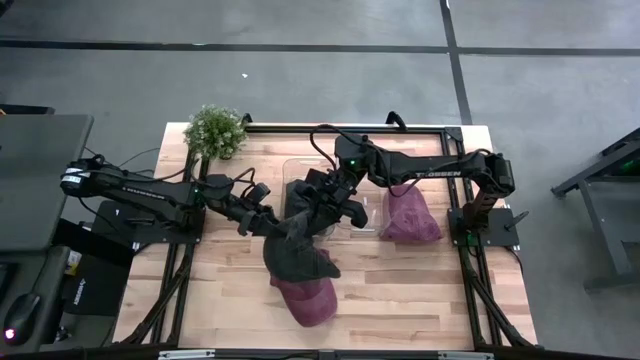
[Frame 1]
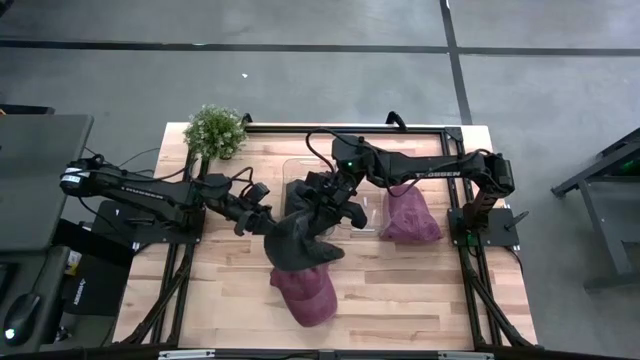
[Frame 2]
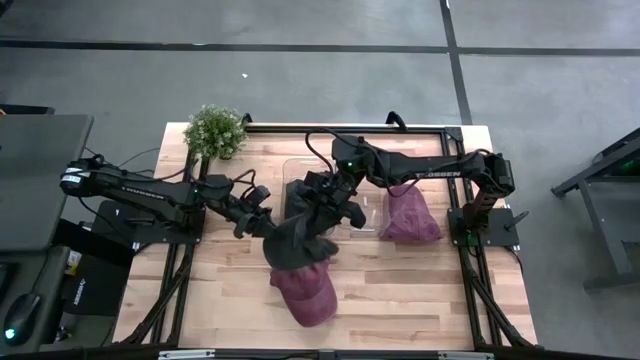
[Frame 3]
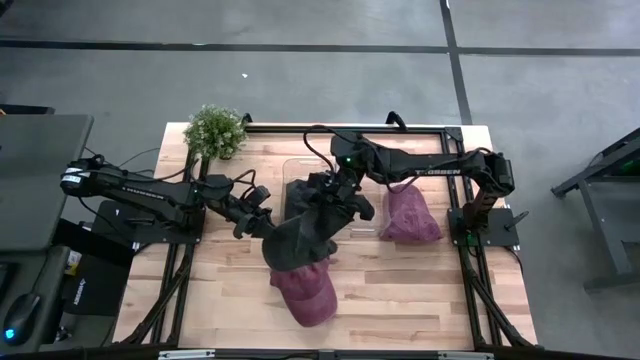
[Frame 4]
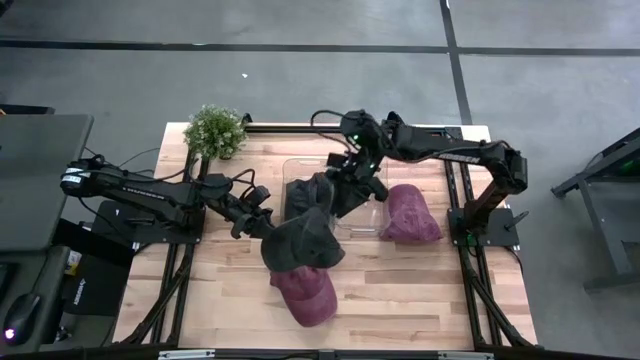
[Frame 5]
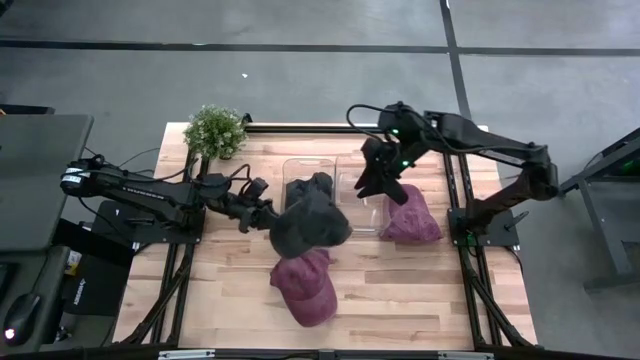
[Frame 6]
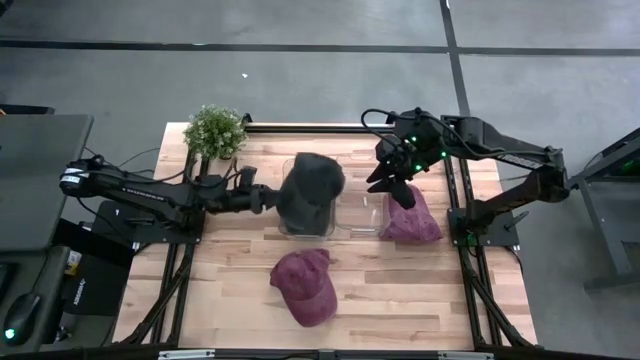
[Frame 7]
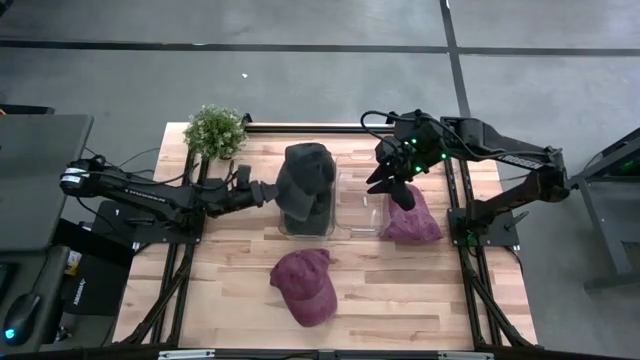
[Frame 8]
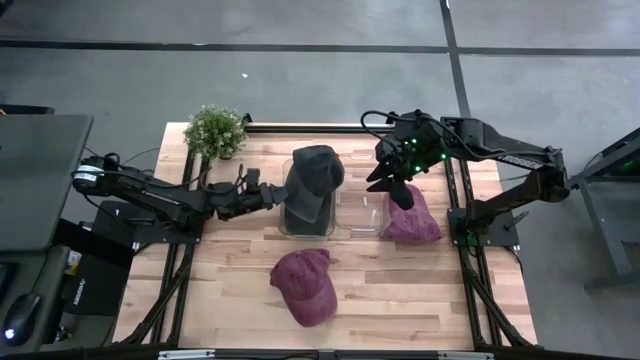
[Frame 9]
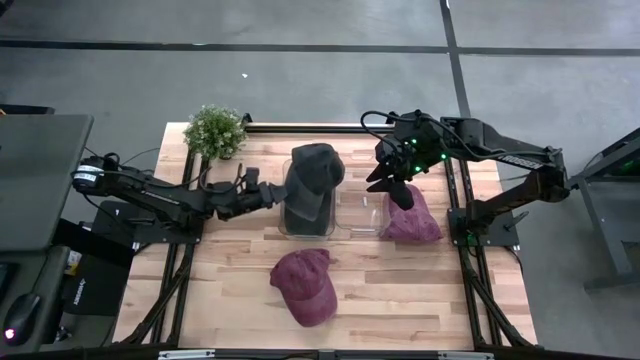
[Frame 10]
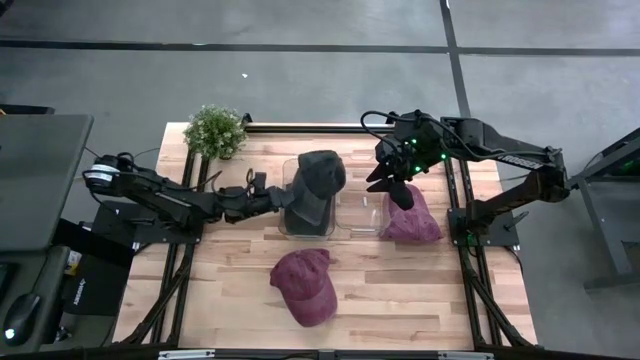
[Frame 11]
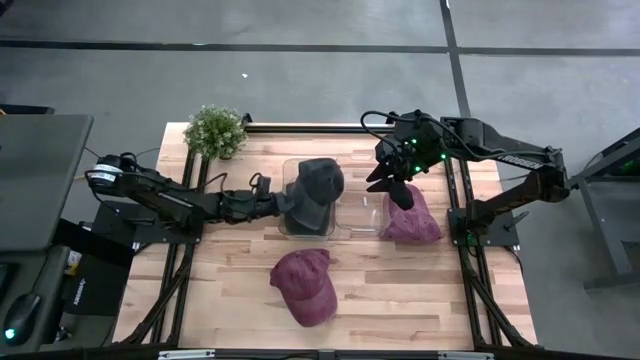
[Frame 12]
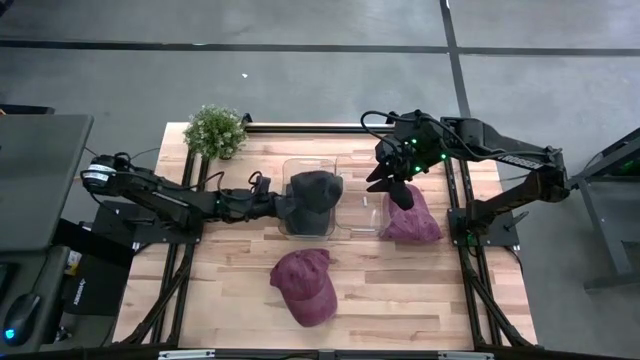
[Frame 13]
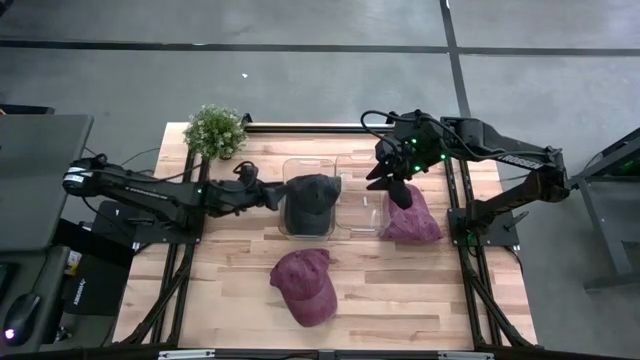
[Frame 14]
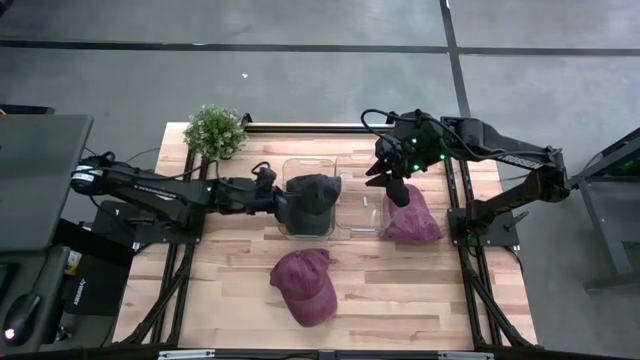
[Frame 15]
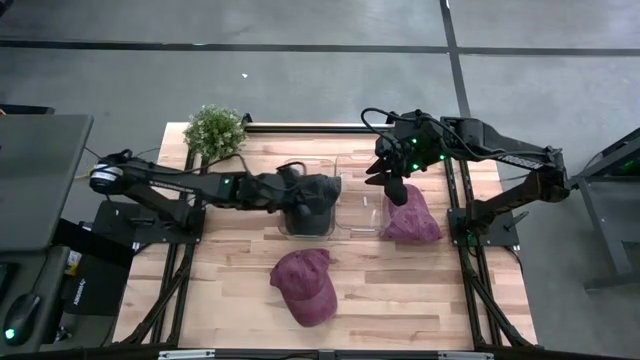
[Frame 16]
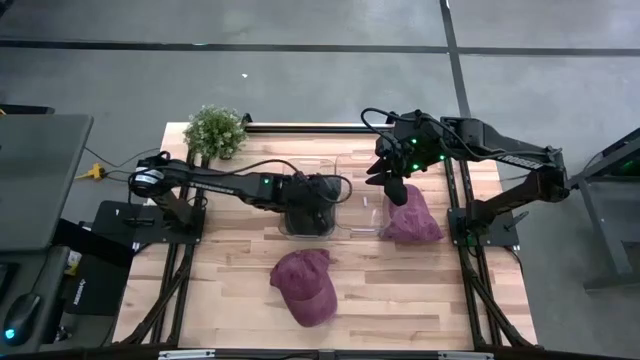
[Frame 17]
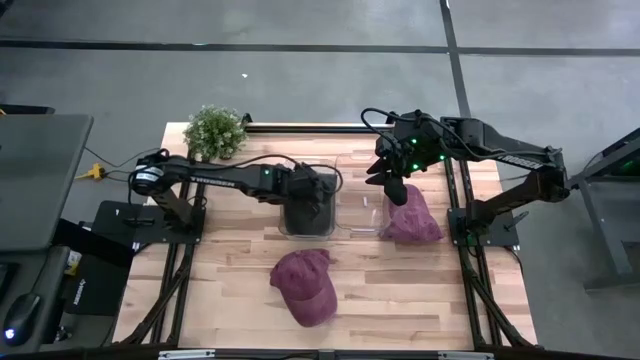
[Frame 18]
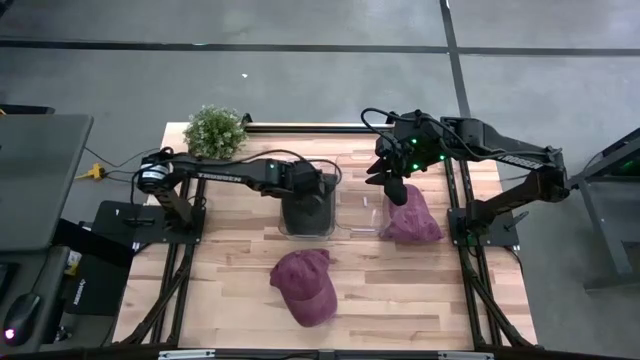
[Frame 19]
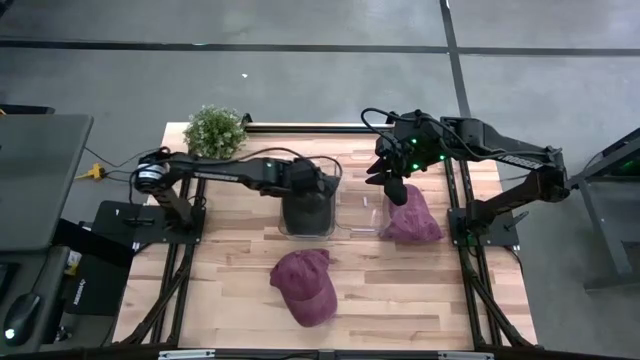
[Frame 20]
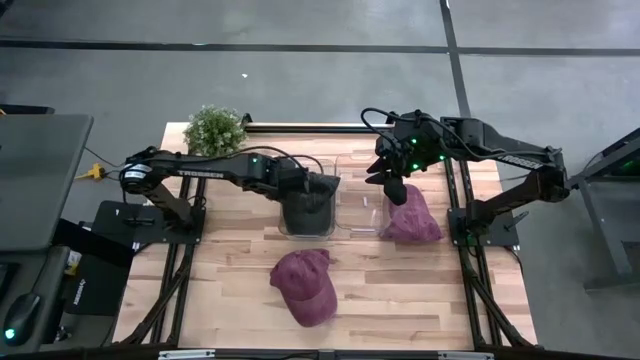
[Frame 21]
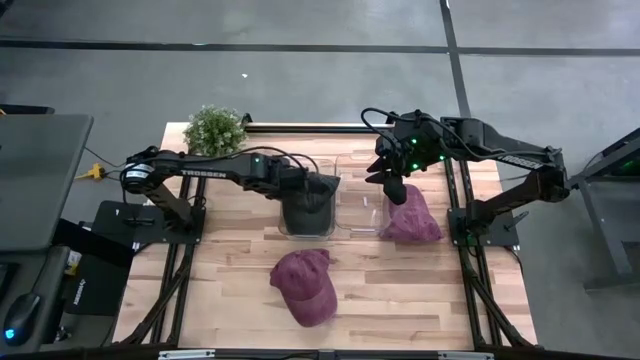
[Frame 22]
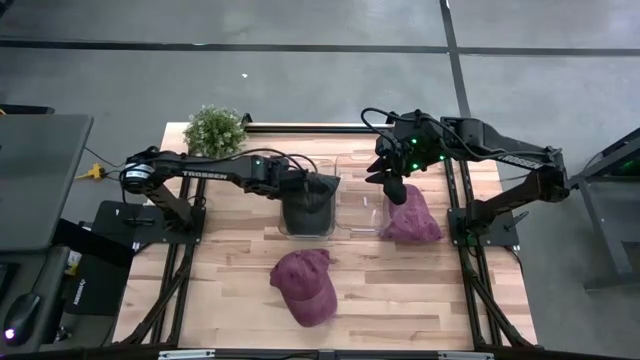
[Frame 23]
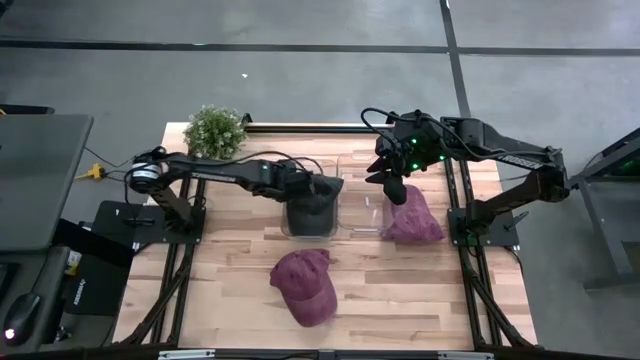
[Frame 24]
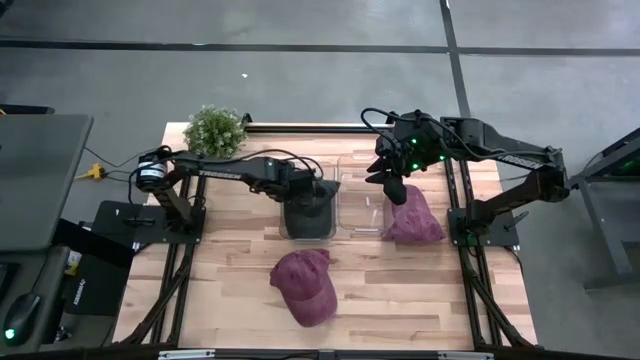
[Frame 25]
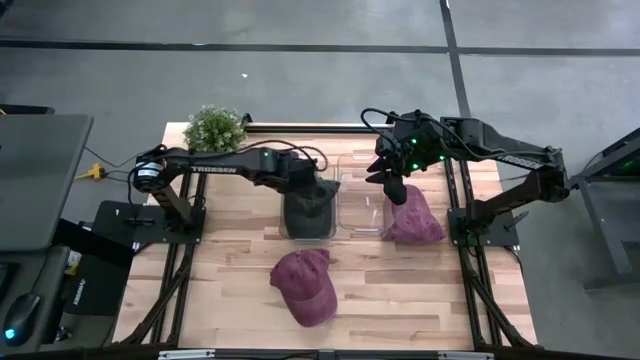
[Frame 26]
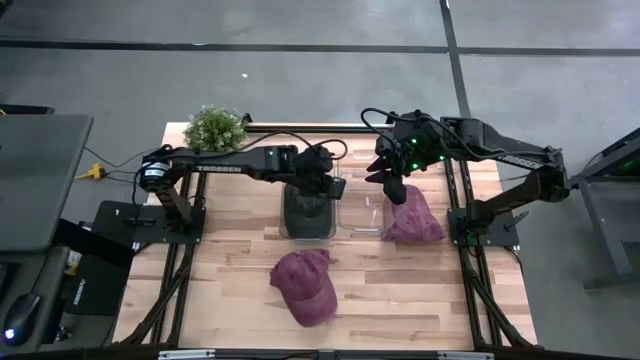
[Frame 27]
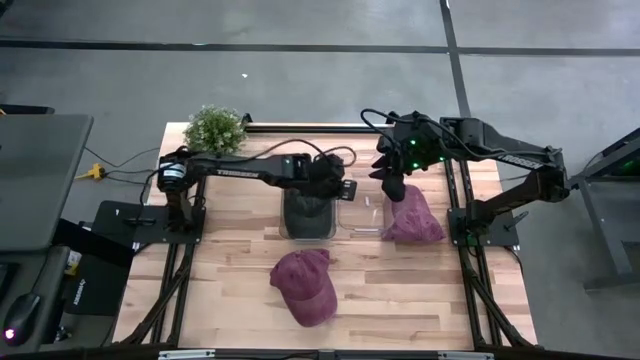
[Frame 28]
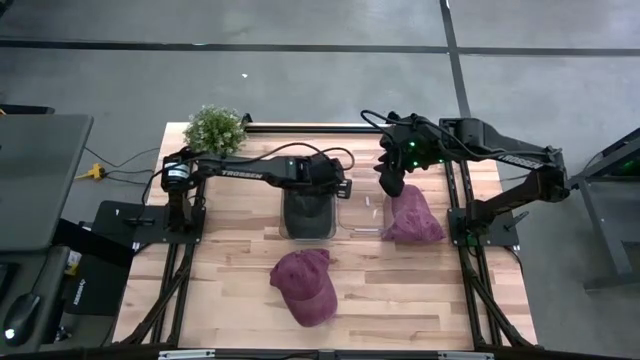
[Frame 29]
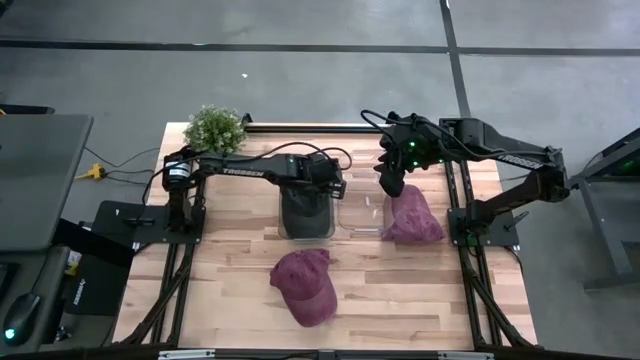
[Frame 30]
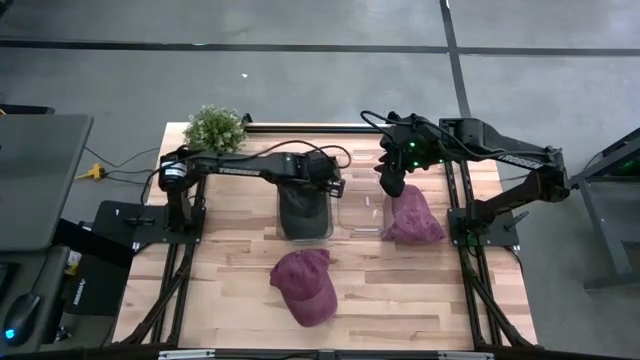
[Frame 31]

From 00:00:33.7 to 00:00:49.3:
Task: Pick & Place hat
Put the black cap into the left transparent bin

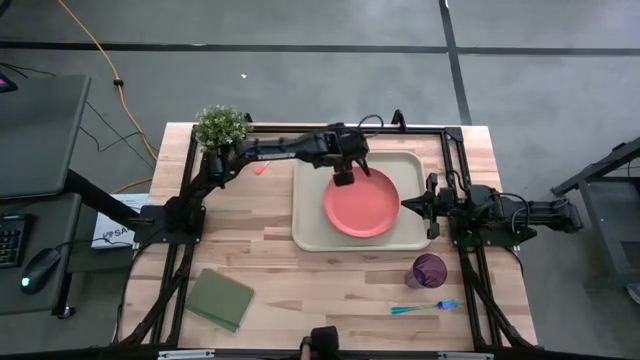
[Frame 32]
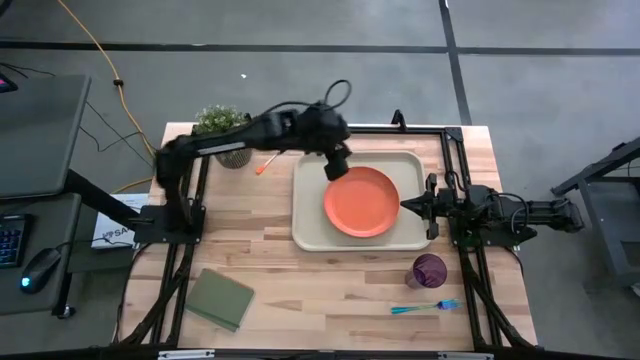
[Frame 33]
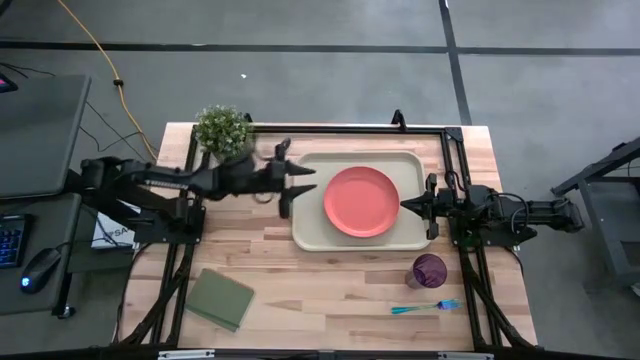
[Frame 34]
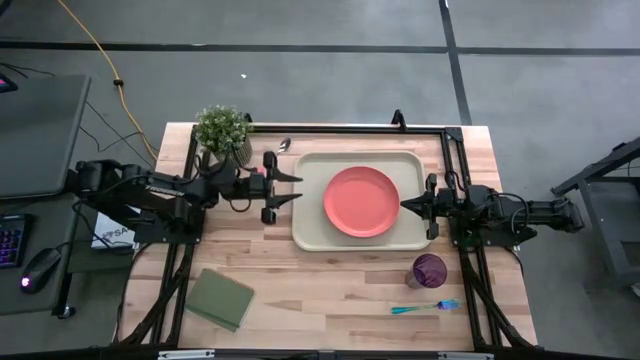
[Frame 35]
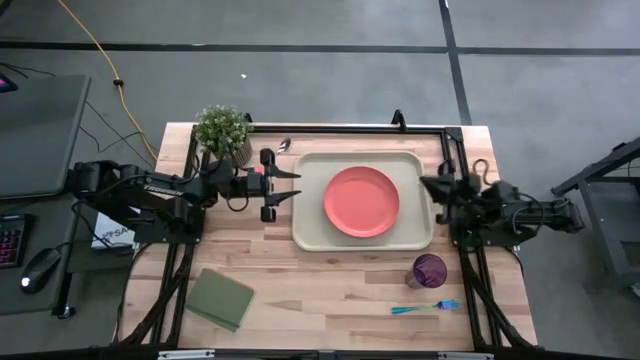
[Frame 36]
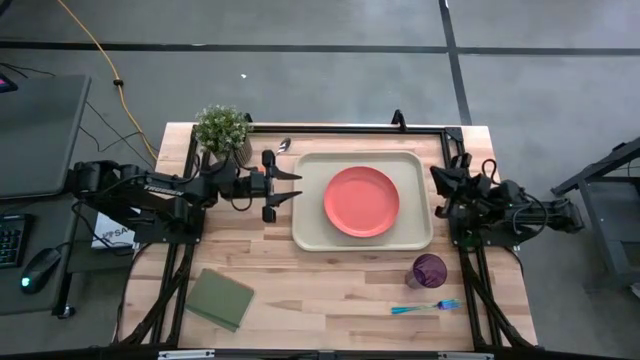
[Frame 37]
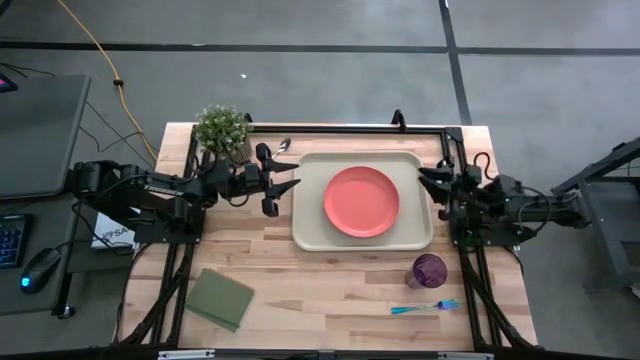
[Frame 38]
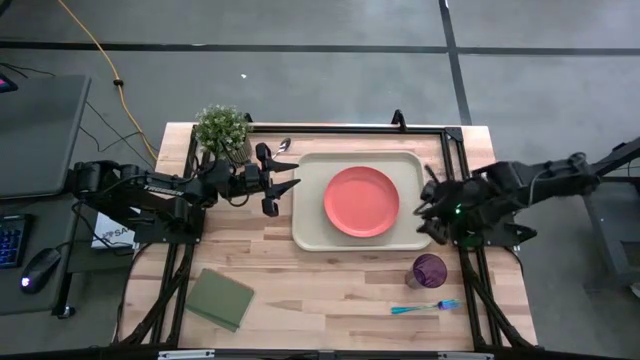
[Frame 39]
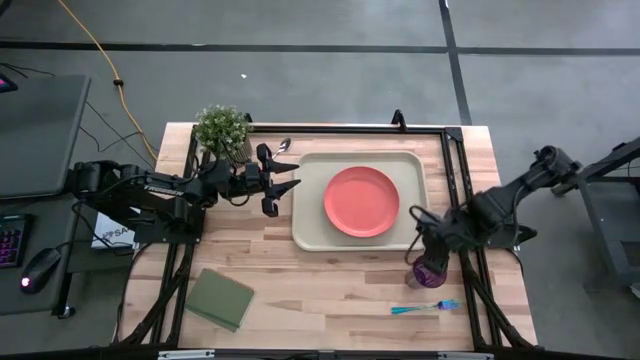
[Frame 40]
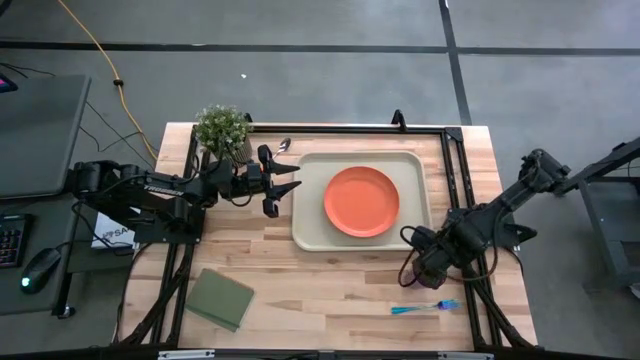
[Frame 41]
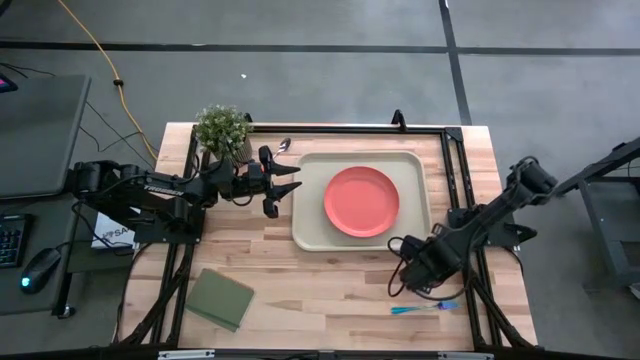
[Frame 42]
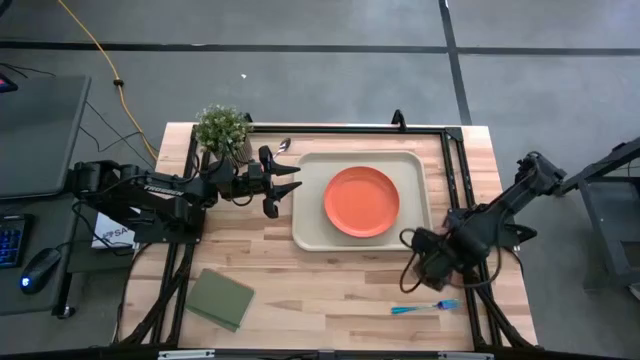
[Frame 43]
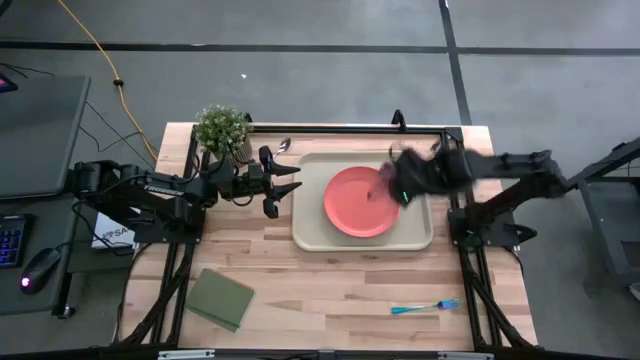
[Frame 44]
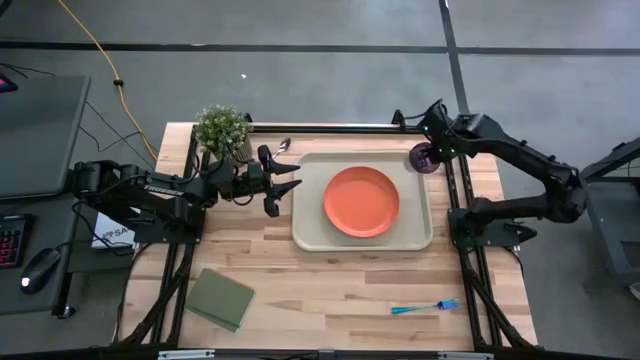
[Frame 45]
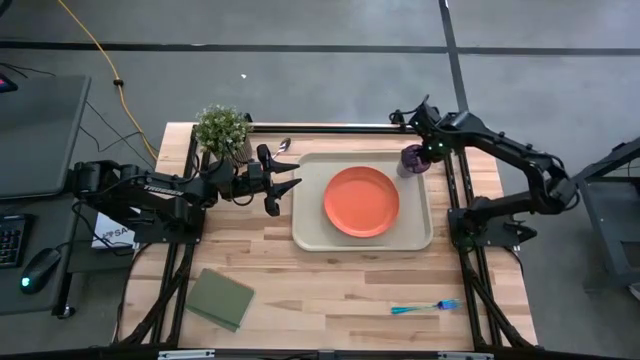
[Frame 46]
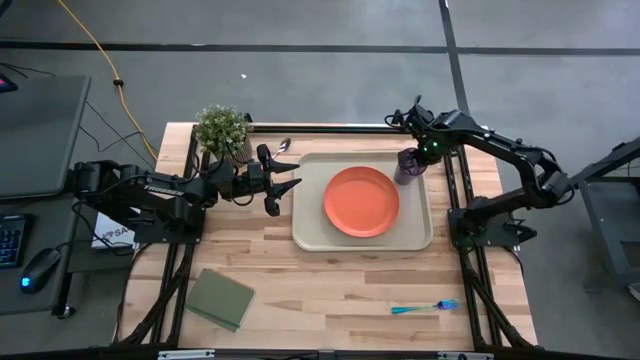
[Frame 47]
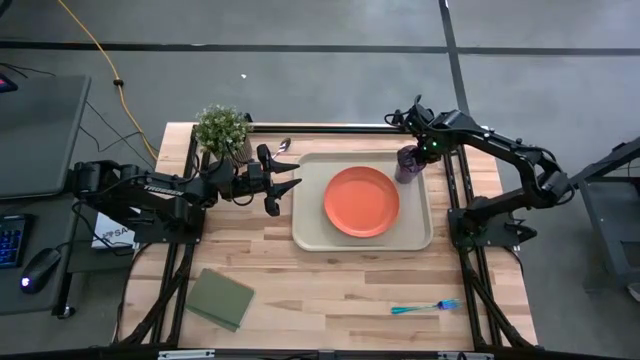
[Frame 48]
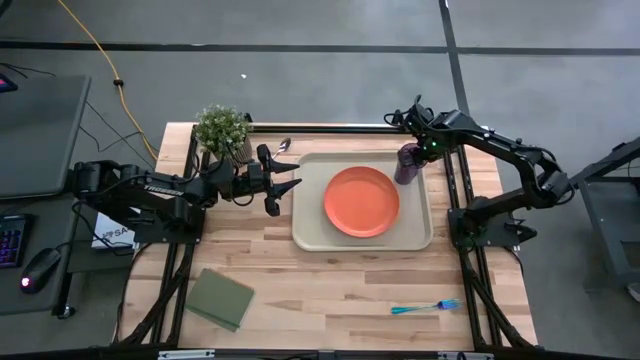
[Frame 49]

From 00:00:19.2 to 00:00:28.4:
Task: Pick and place plate/cup/fork/spoon on tray
Put the violet glass on the white serving tray at the top right of the orange plate
